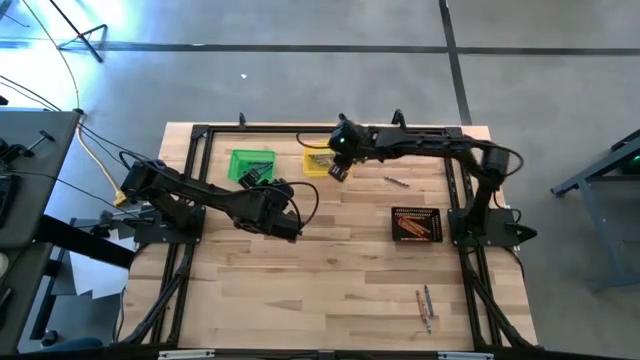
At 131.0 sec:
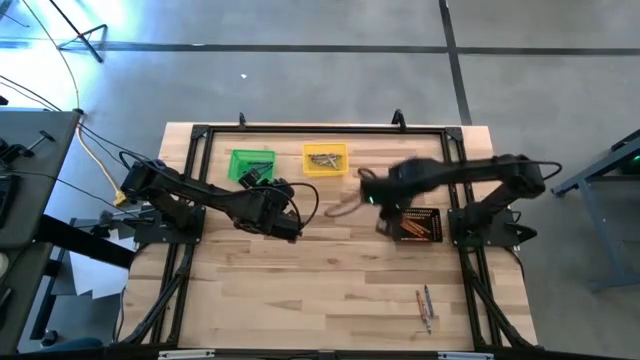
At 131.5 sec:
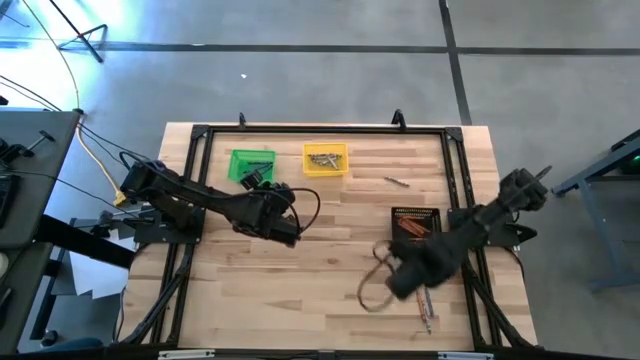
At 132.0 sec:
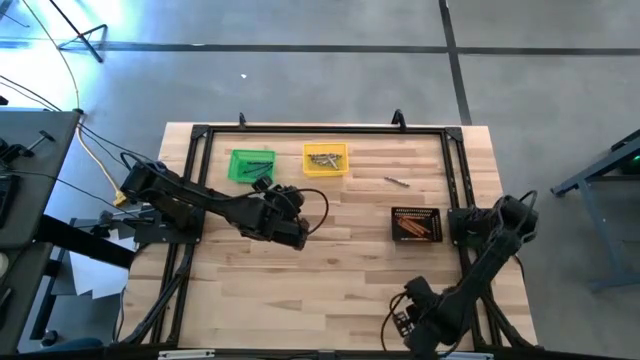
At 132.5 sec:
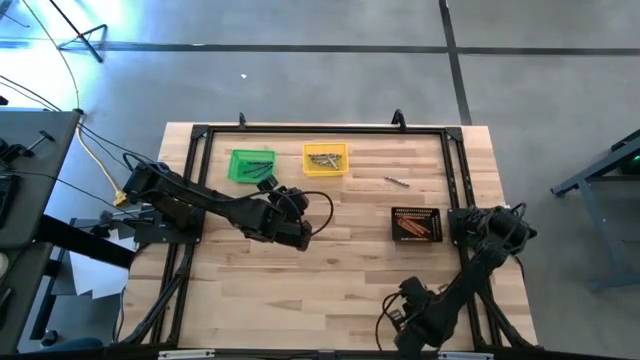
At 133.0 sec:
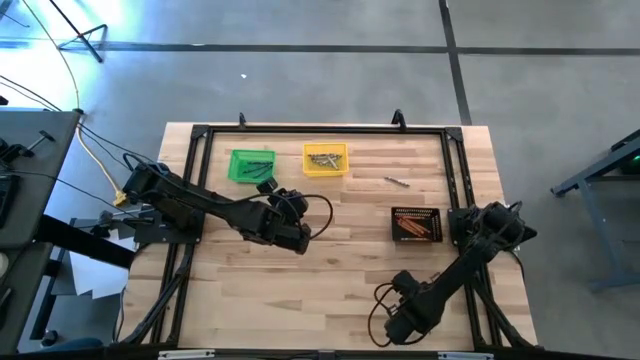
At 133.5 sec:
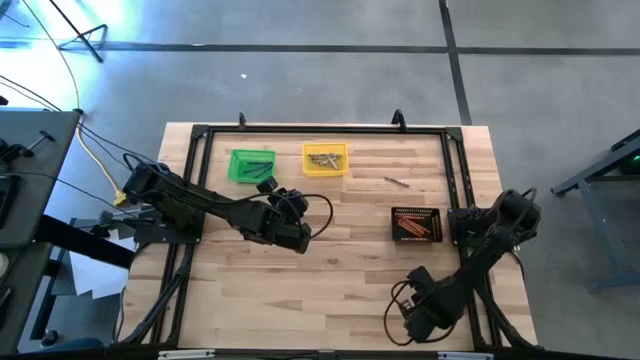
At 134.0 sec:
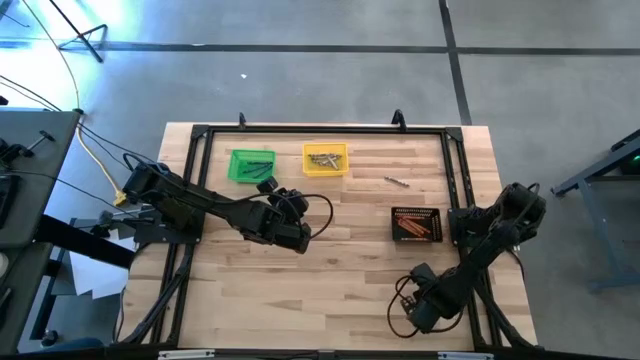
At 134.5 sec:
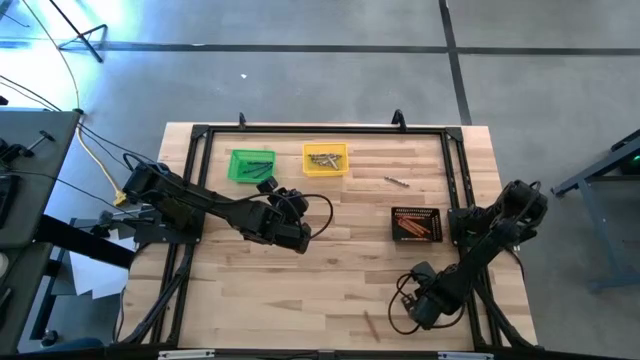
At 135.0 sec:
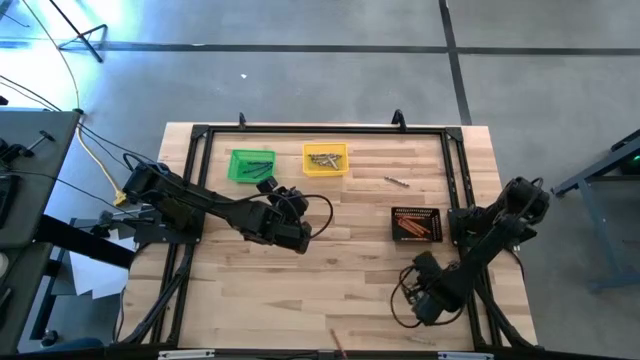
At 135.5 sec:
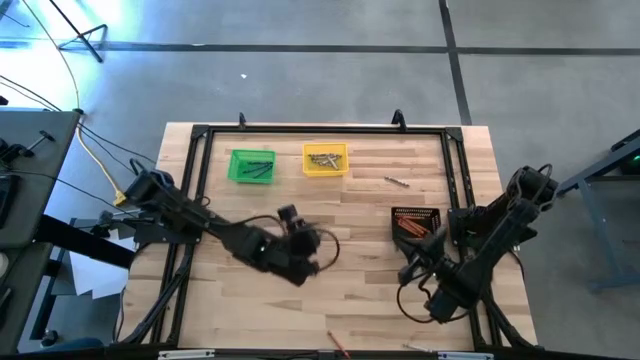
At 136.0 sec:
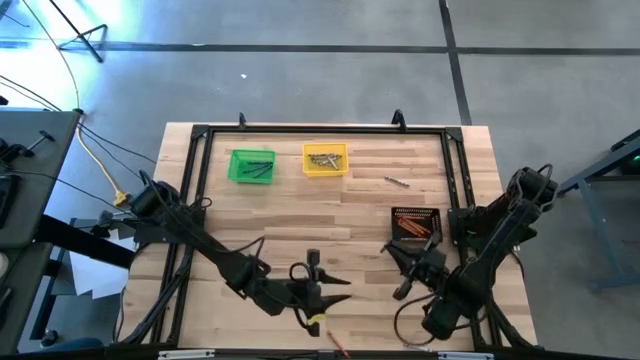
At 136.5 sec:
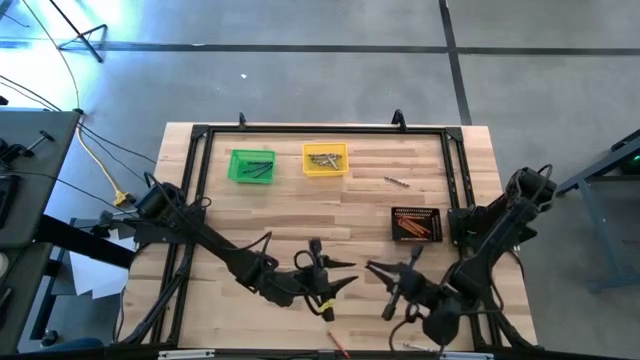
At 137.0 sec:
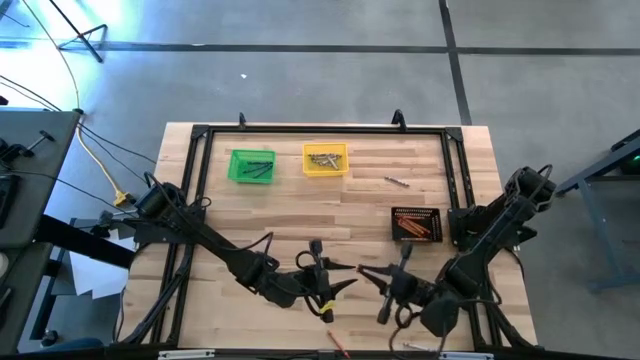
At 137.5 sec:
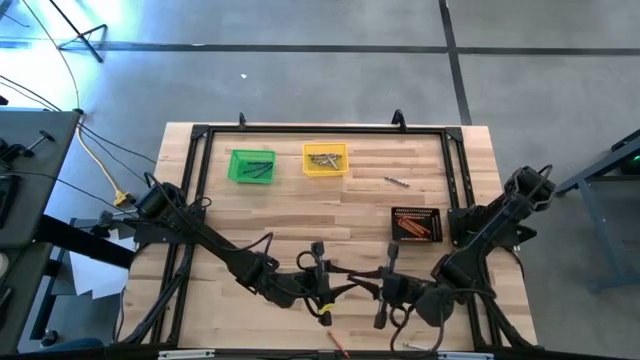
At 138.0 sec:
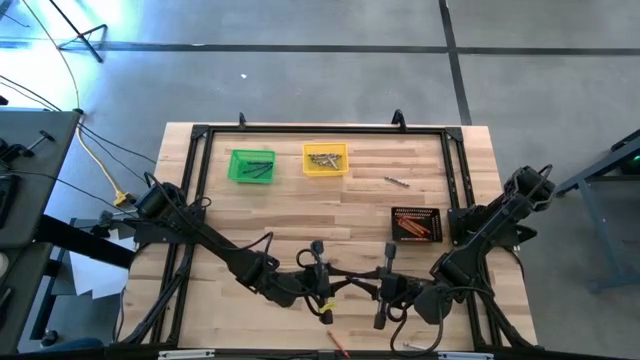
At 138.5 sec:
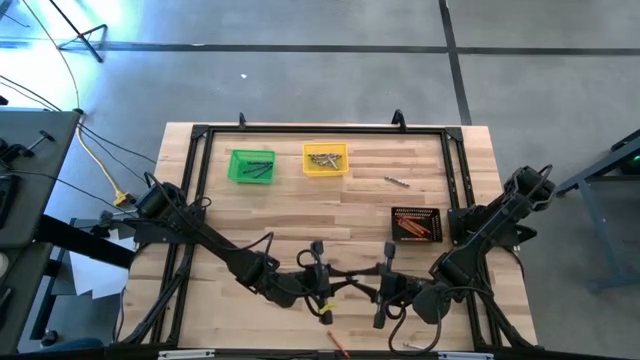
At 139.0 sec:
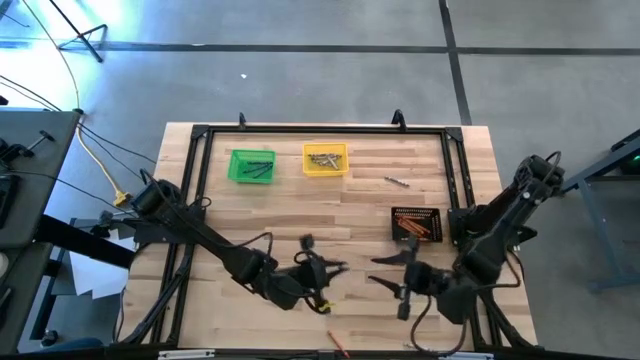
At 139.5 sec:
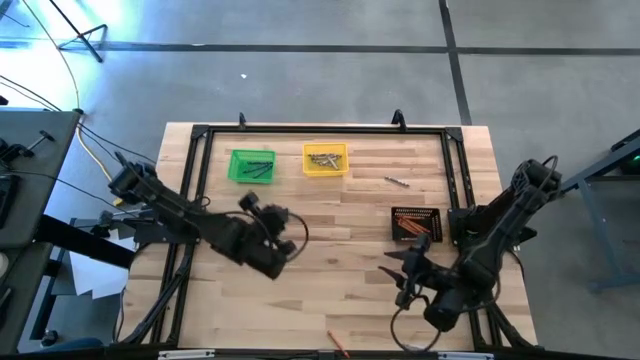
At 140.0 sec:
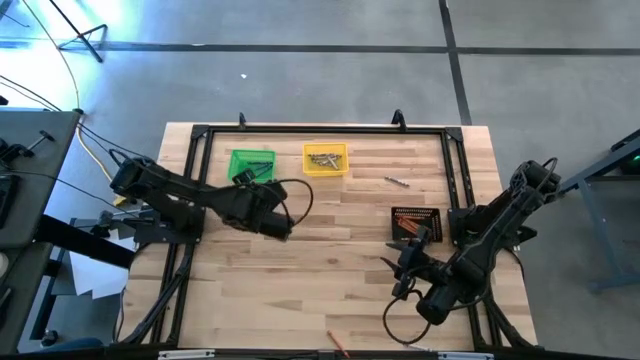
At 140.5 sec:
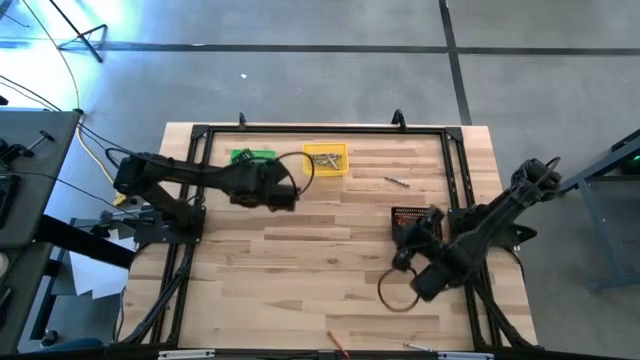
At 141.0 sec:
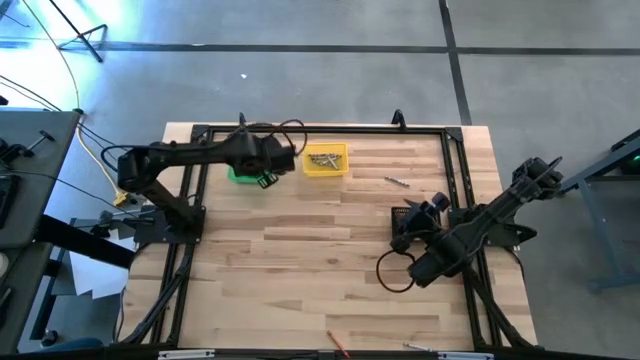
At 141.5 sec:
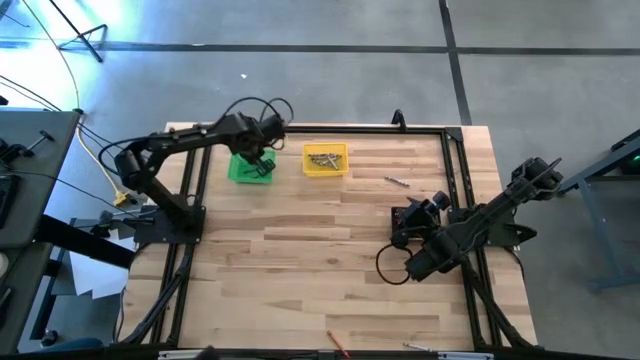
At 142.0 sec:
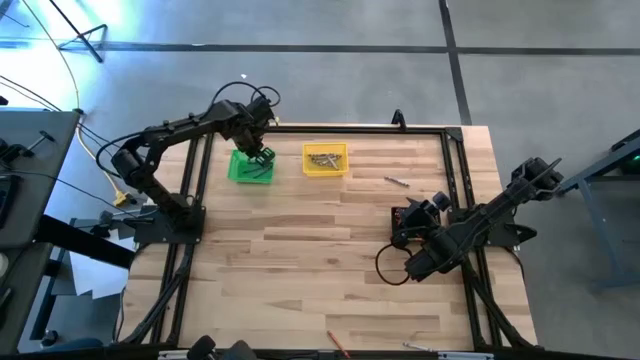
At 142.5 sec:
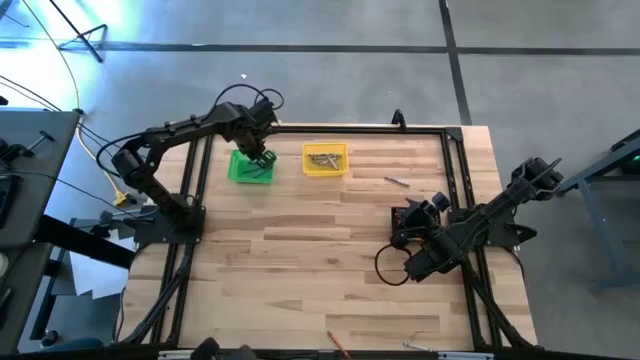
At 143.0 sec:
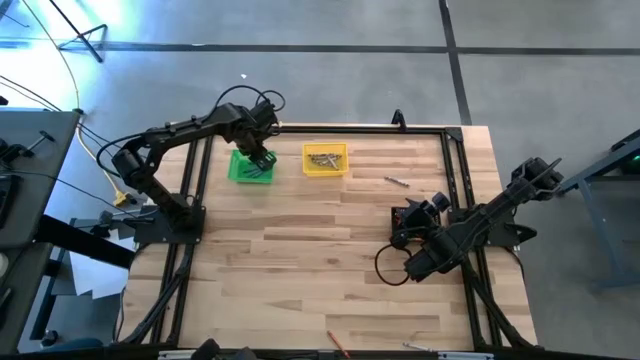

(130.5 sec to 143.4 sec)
Task: Sort crayons
Put the blue crayon into the green bin

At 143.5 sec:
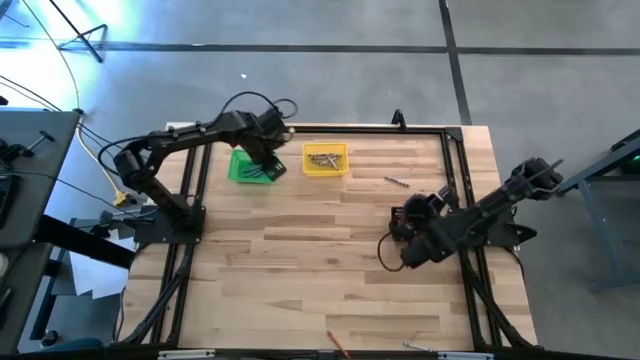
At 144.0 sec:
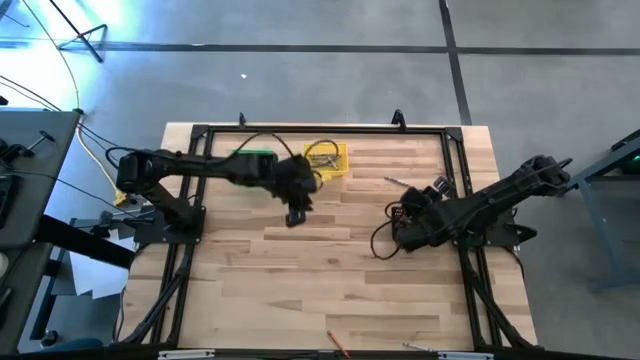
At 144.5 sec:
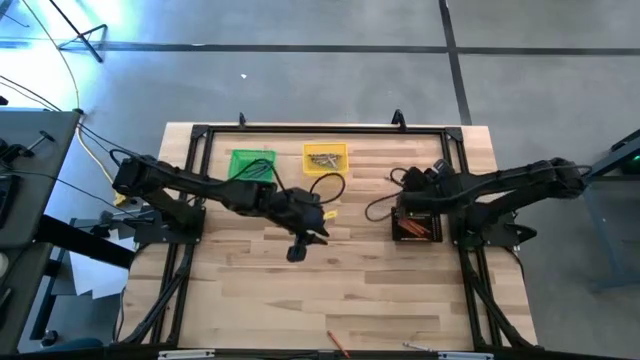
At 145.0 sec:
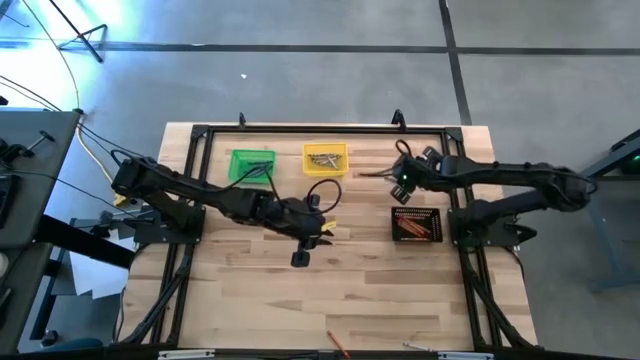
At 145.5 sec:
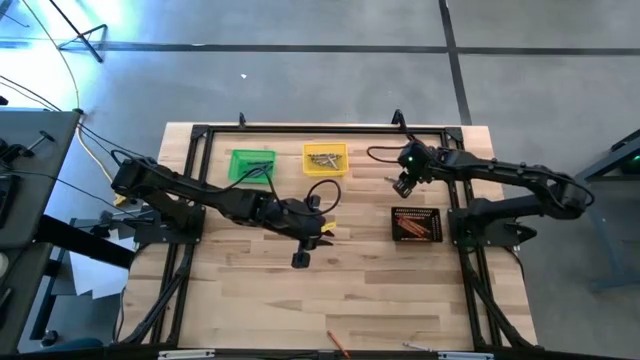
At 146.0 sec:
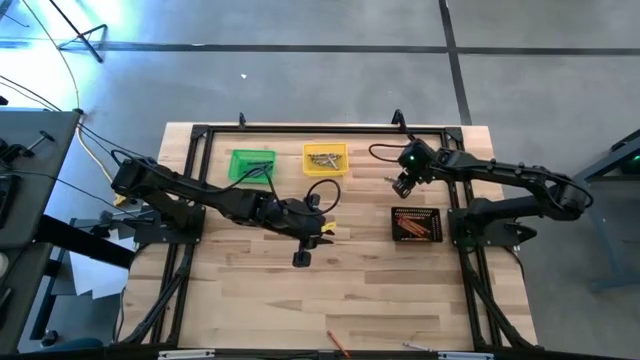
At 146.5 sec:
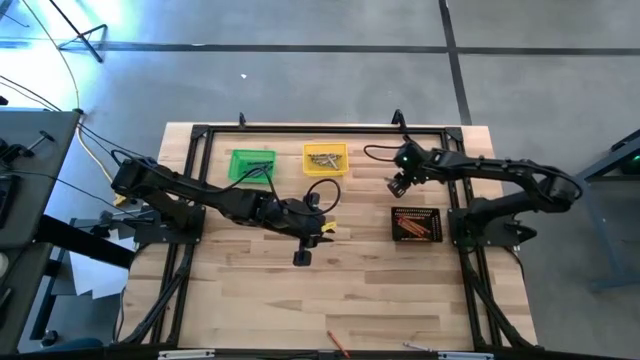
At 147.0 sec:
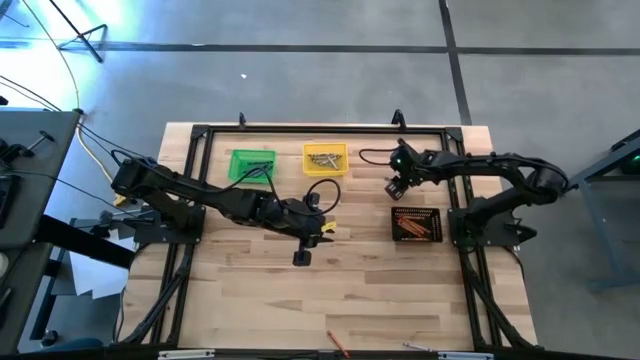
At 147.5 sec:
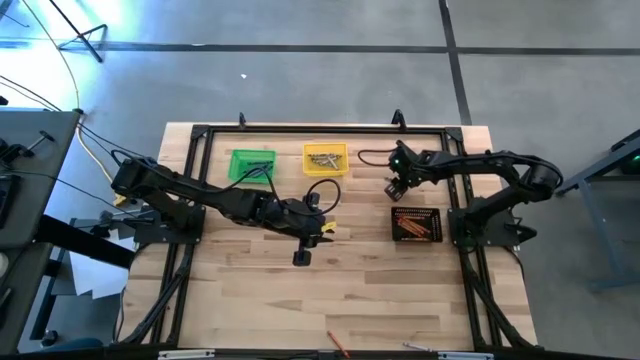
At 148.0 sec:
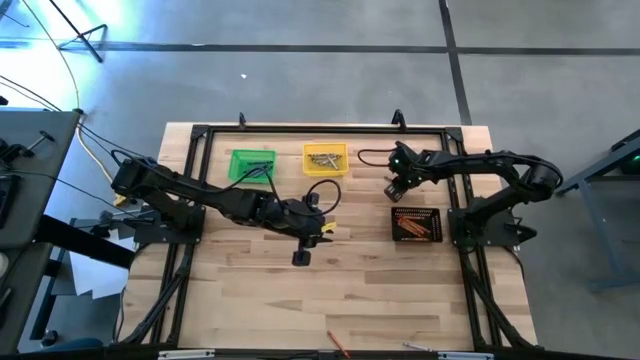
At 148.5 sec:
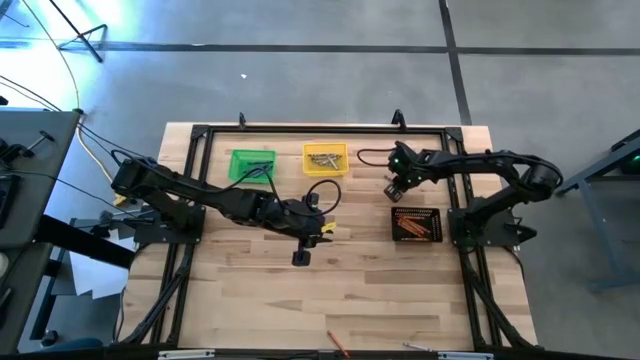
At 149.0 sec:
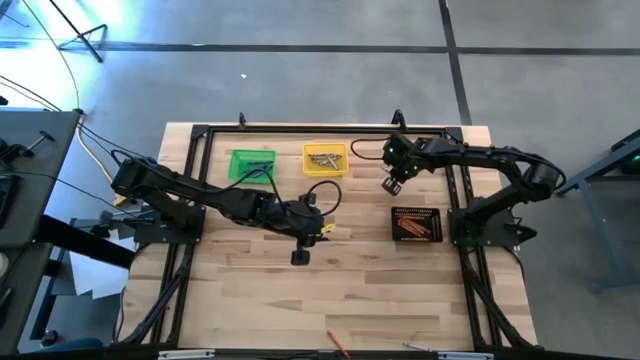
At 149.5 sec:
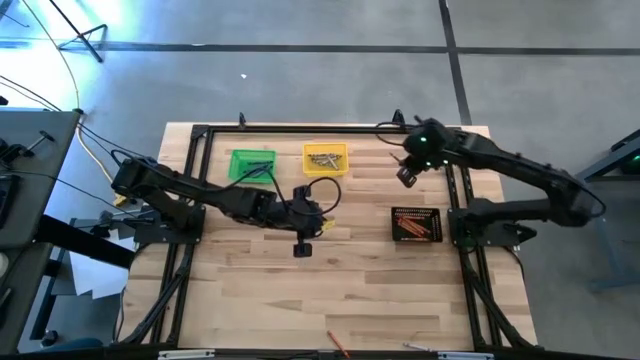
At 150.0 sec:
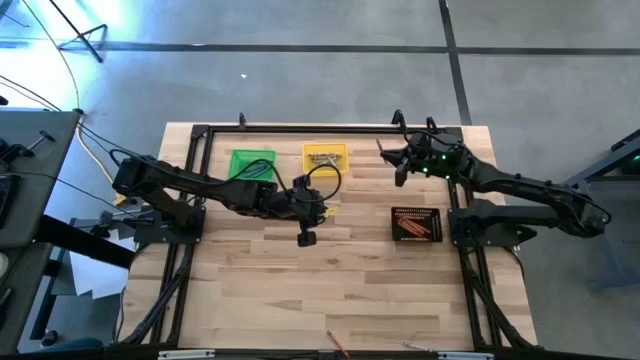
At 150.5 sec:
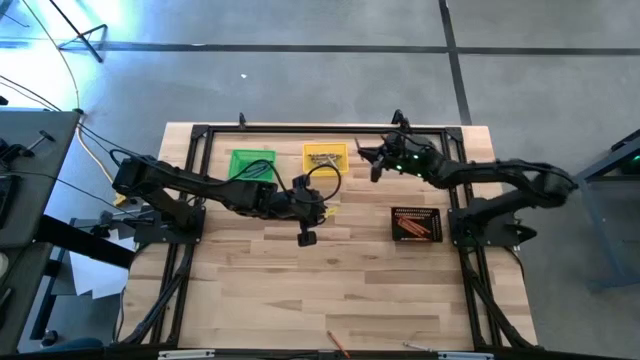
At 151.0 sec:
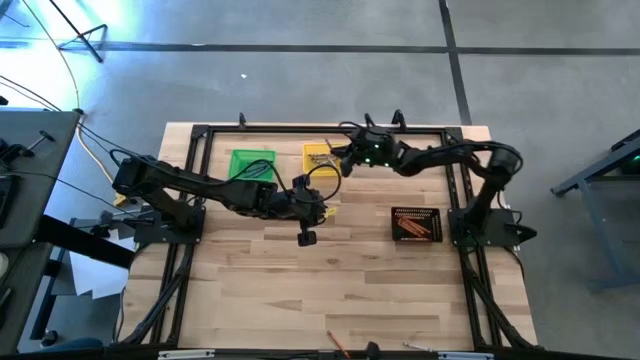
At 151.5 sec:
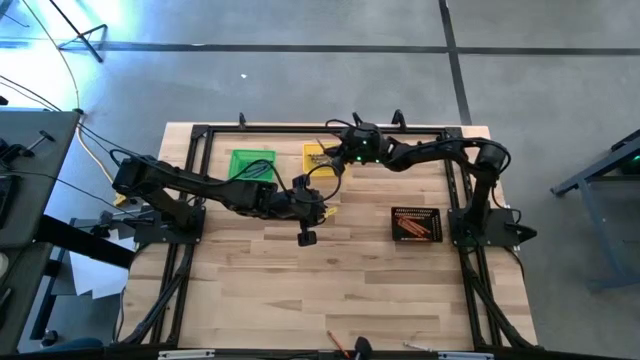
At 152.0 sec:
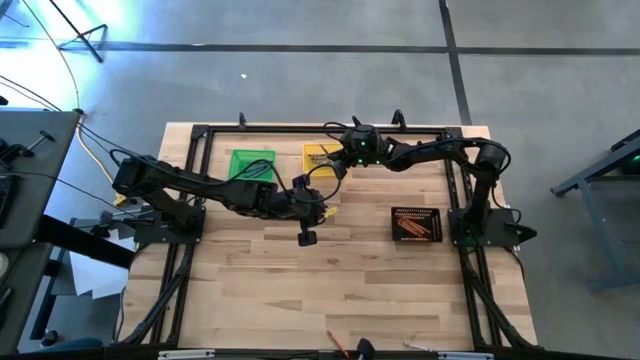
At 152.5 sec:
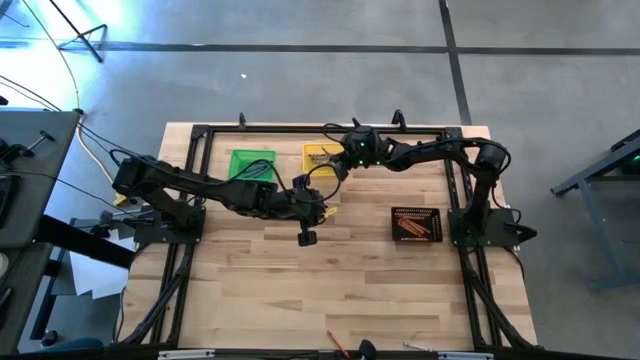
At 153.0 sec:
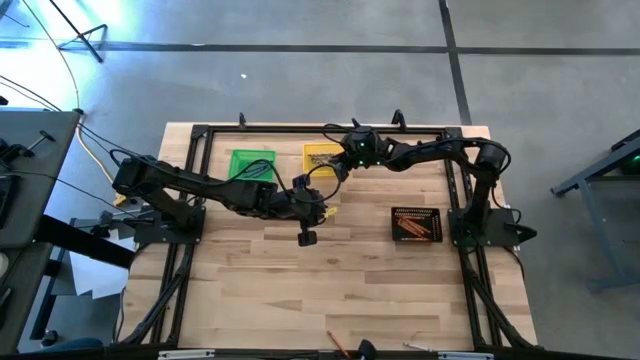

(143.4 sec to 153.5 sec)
Put the gray crayon into the yellow bin
